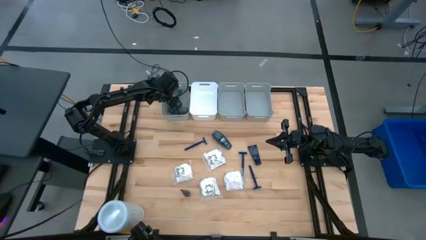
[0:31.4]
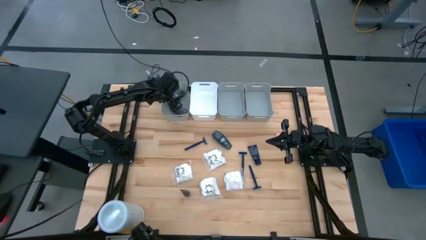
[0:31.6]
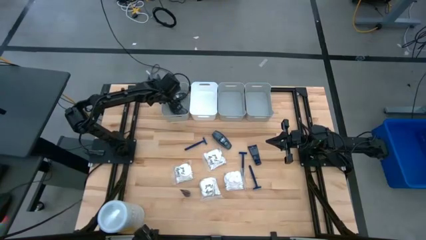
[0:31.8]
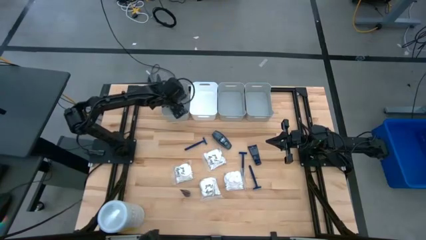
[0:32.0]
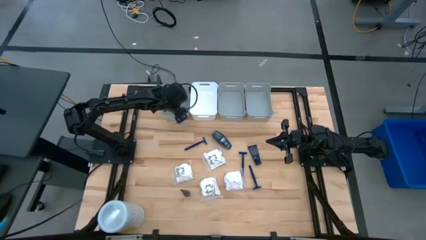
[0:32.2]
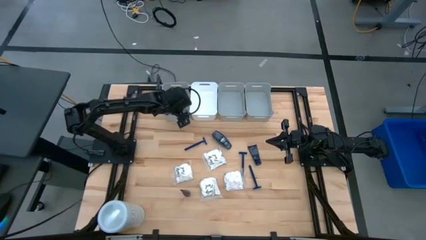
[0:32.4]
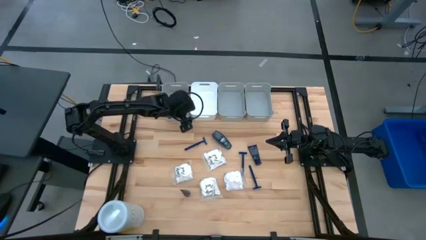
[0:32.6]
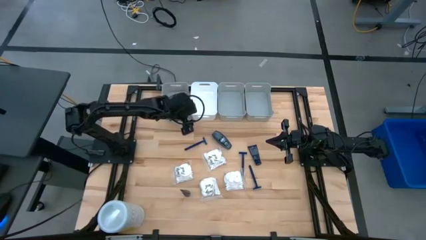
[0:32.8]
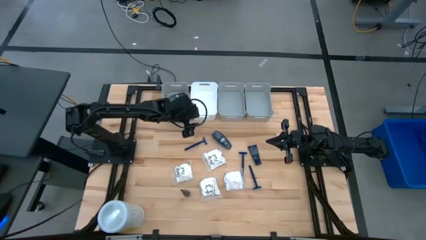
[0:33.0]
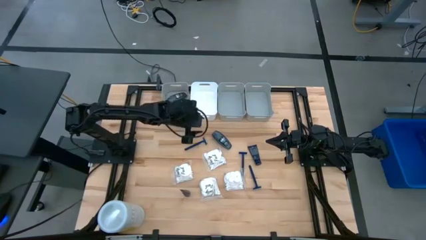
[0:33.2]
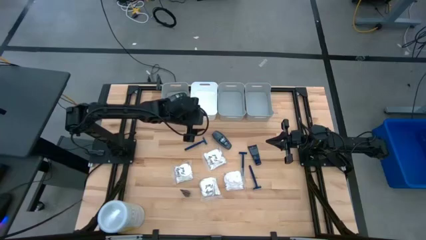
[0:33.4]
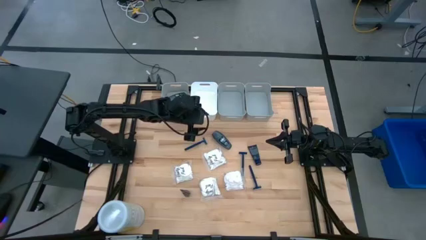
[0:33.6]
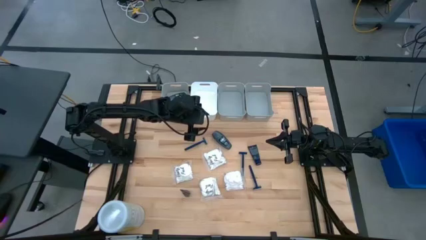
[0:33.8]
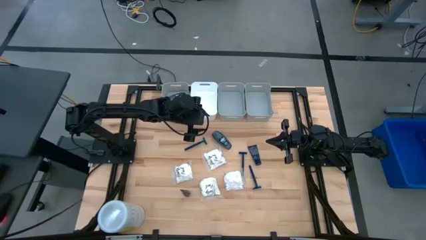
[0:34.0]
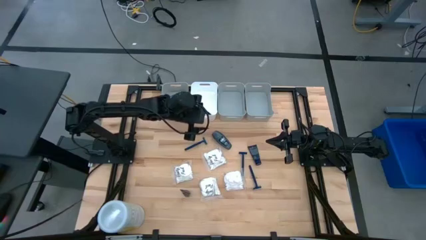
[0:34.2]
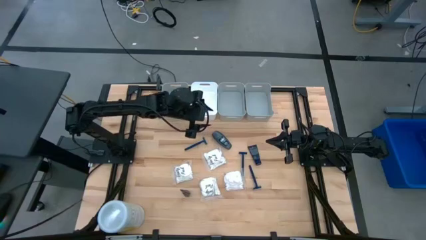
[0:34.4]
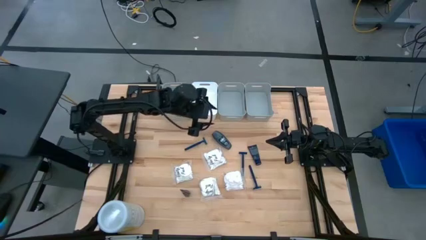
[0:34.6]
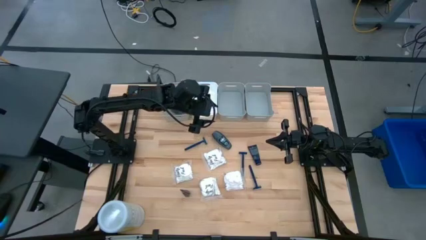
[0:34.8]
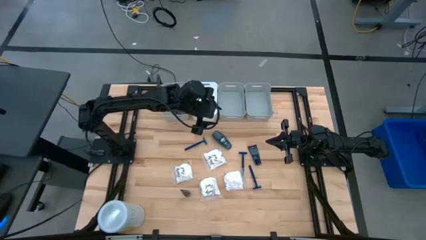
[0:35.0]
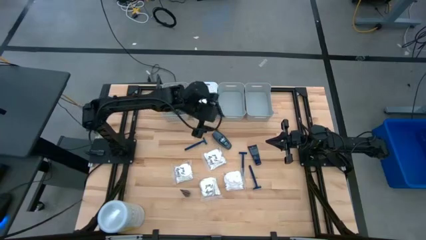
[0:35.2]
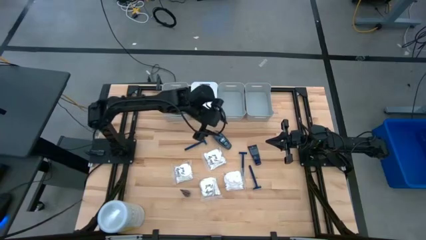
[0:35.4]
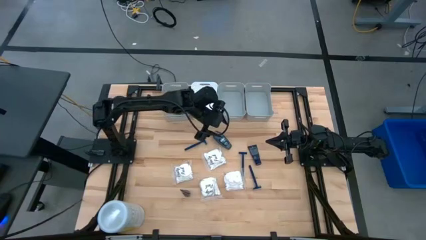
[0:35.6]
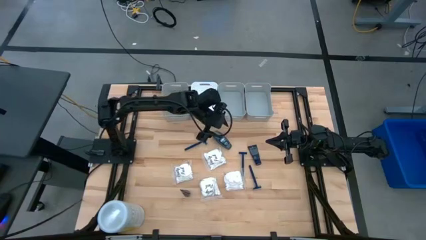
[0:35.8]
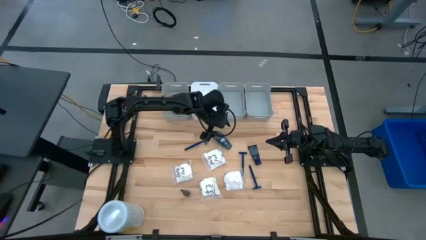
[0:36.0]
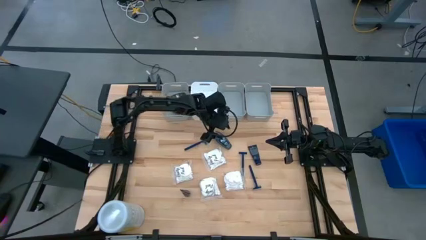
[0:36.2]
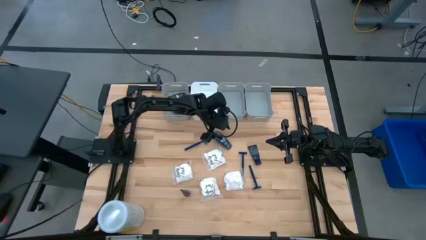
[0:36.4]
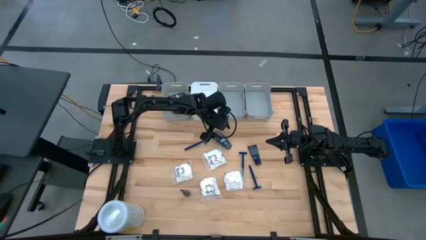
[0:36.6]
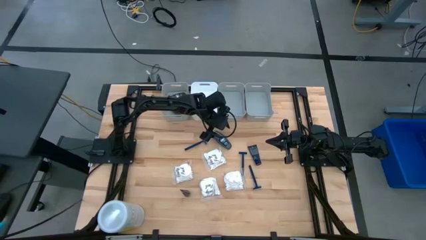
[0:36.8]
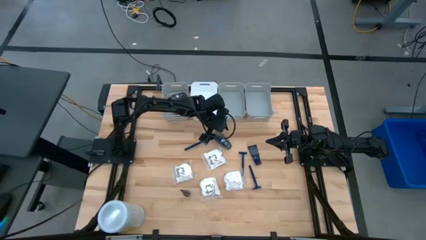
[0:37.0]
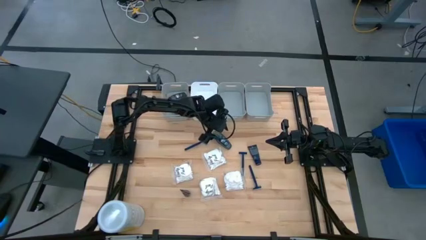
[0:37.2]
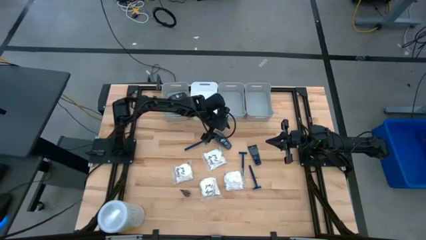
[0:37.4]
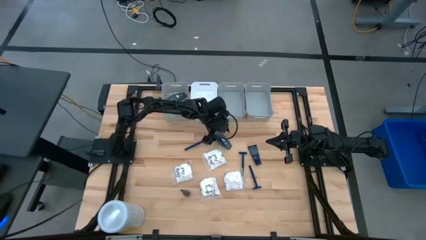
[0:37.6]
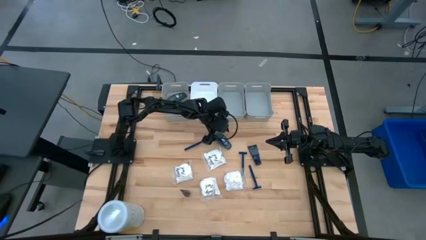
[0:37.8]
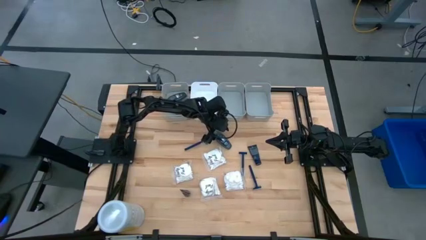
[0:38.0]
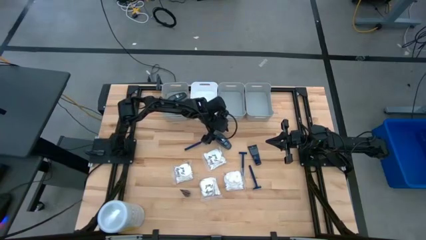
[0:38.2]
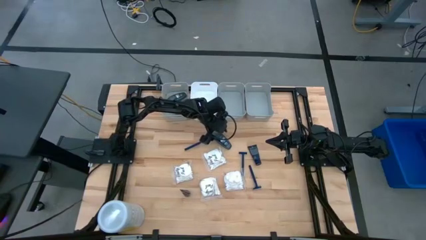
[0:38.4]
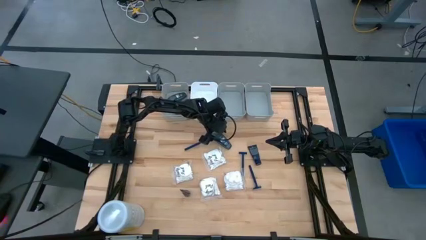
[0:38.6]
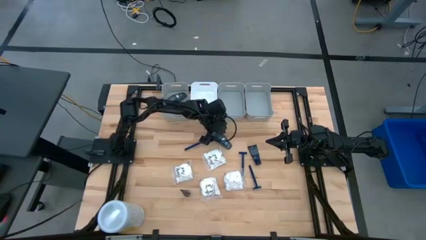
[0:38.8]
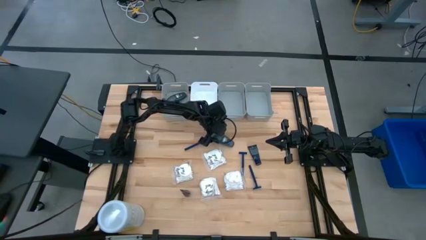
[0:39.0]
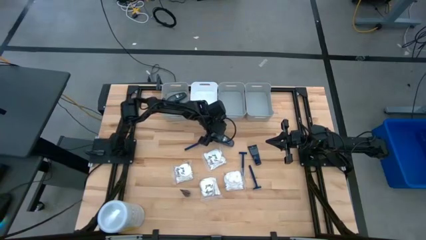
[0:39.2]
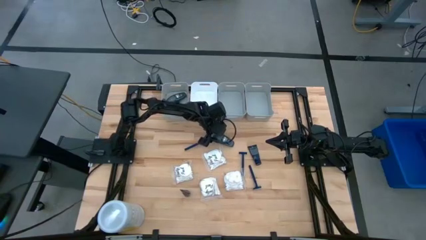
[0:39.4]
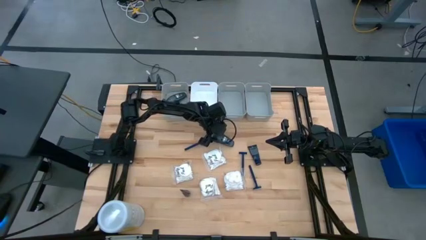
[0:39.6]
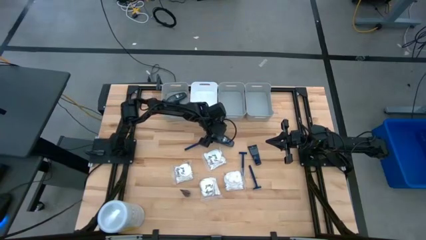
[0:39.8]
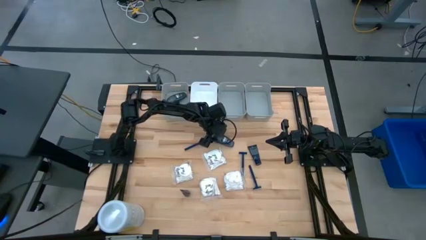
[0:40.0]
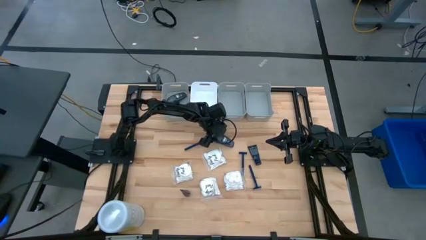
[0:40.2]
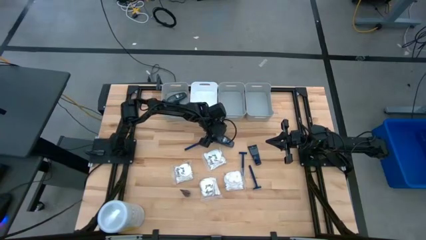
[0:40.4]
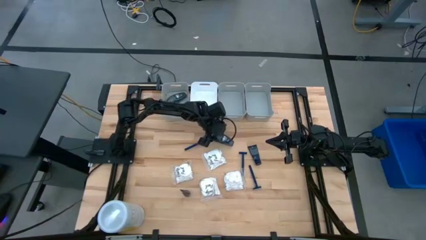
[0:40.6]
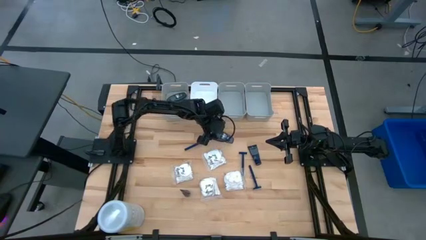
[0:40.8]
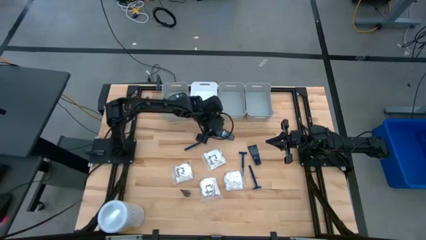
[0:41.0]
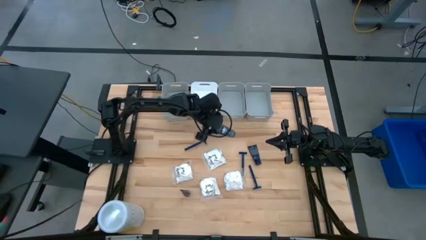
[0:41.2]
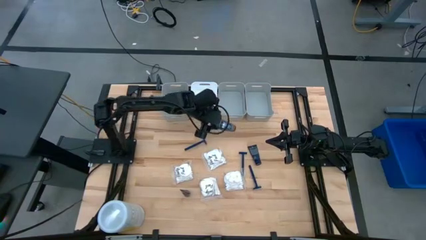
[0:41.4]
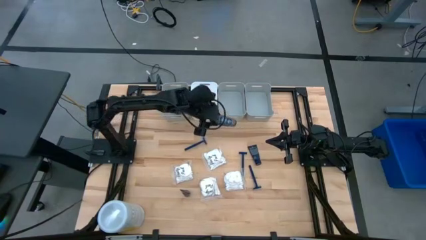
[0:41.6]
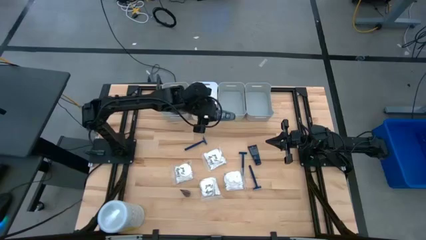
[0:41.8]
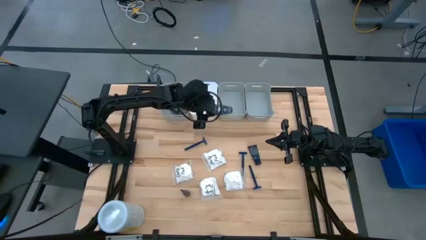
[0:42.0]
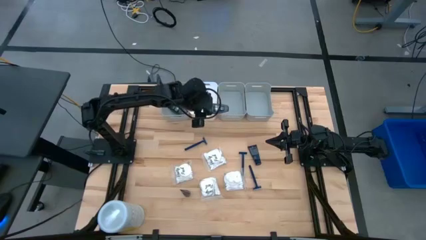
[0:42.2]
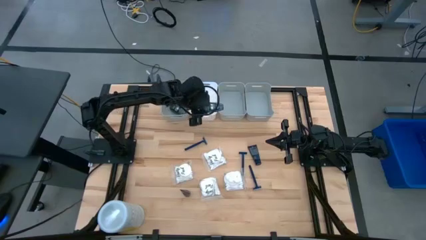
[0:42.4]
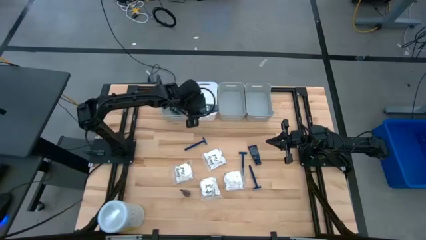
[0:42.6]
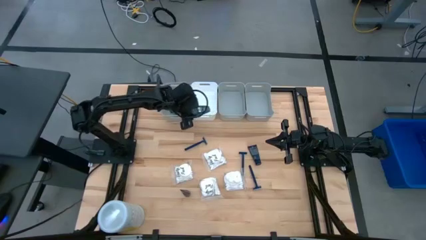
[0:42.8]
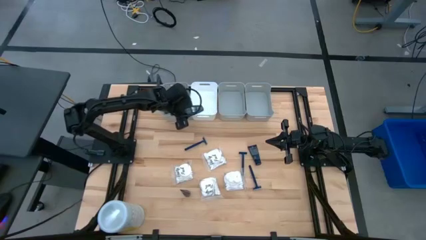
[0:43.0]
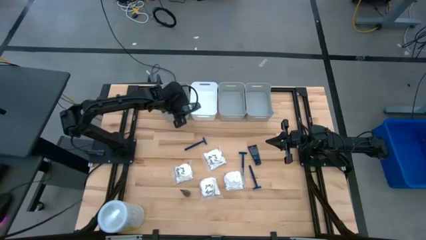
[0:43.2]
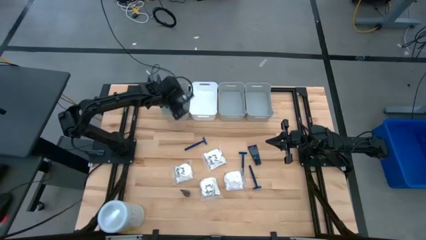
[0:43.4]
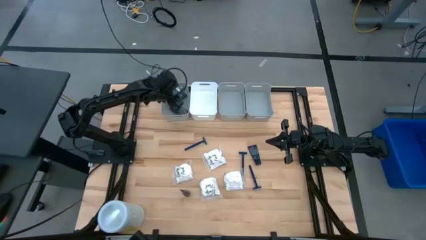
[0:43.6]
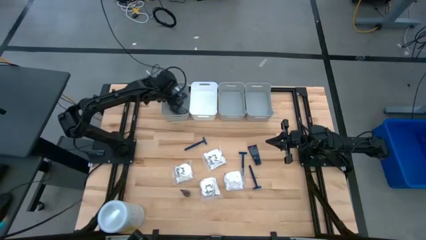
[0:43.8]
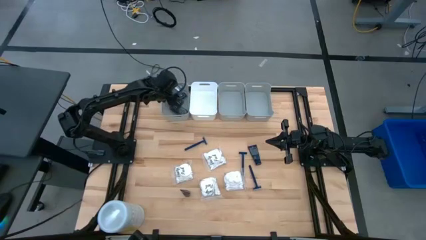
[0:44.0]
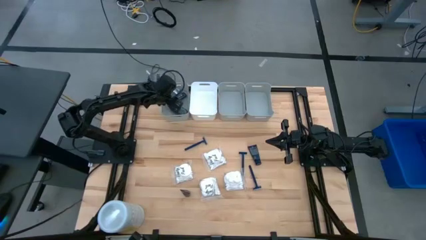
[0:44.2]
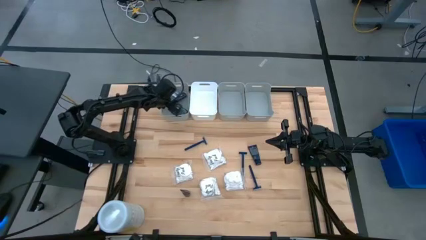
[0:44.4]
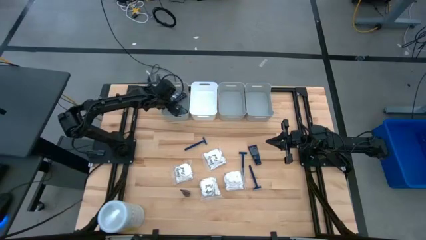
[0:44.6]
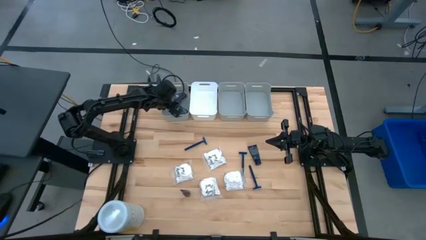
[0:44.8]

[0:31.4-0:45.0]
Task: Pick & Place Travel size toiletries
Put the gray deodorant into the left gray bin

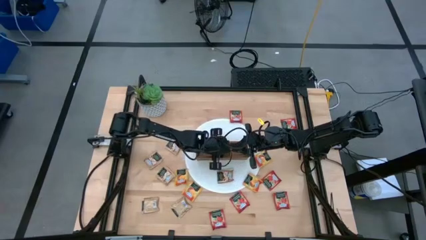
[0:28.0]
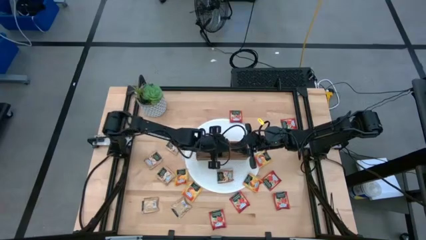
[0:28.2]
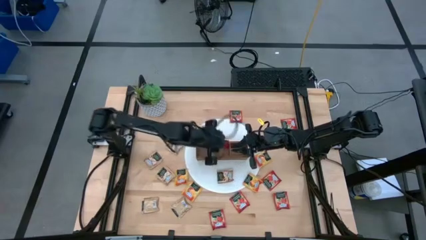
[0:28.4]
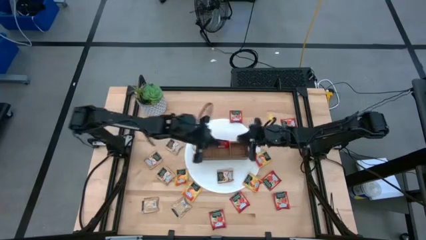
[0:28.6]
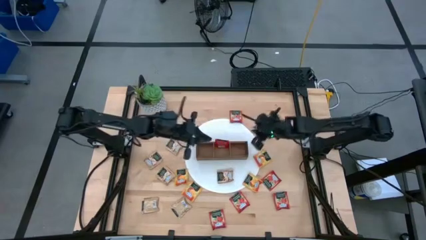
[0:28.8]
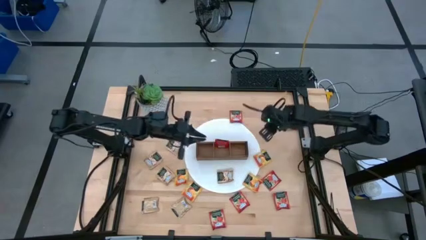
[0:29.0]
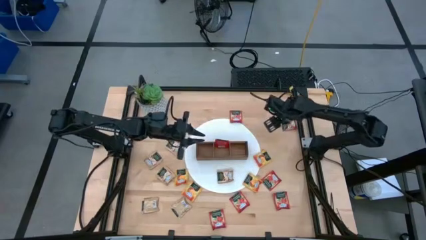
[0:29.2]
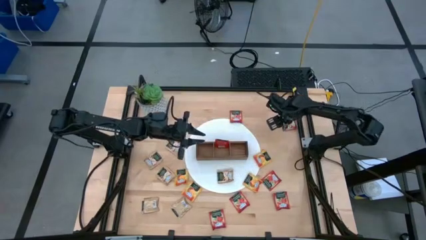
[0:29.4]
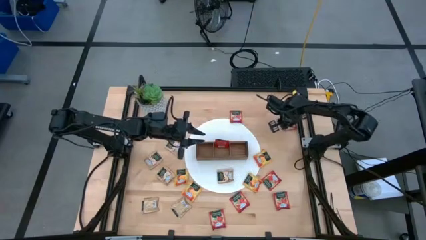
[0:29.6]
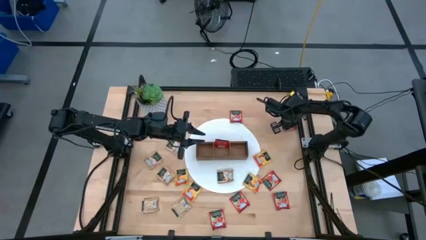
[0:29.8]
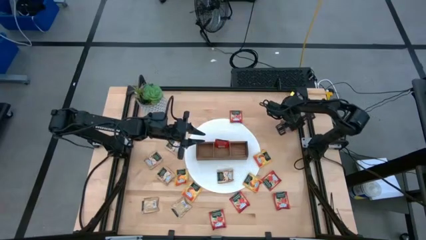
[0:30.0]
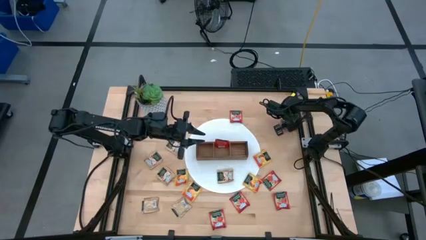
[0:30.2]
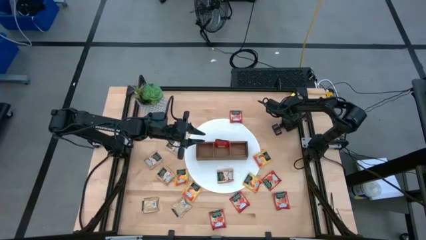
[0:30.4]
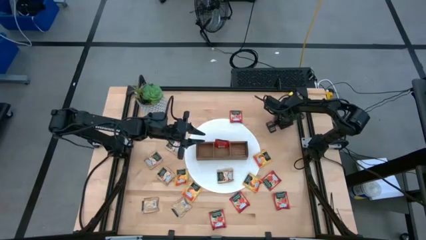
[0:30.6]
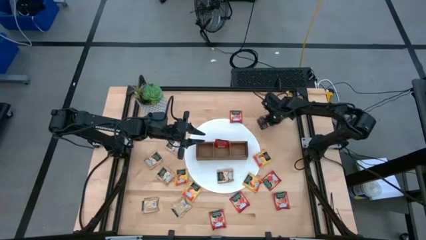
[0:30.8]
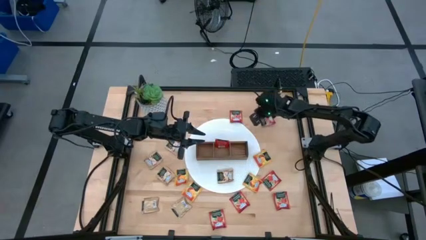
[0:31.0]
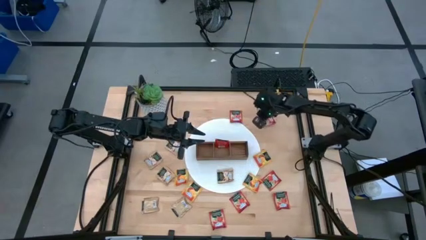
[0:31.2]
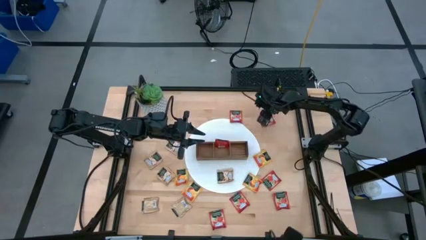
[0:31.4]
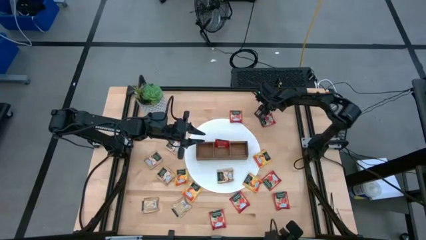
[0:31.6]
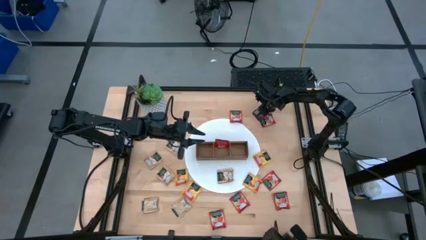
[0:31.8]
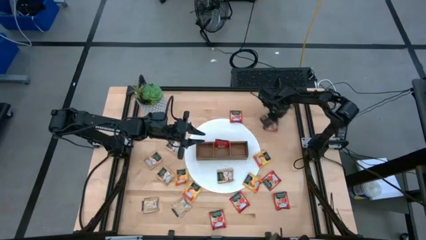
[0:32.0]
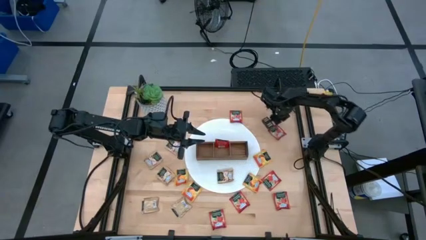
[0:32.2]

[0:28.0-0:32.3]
Task: Pick & Place Tea
Put the red tea bag into the middle section of the wooden organizer
